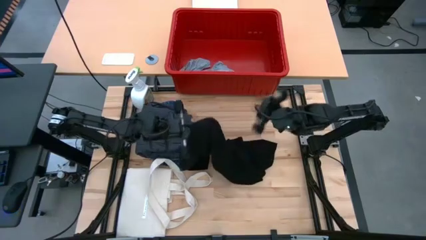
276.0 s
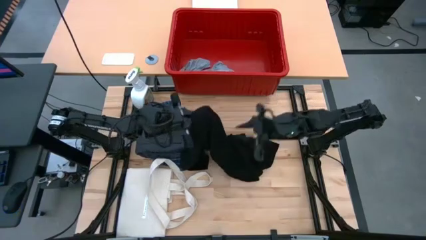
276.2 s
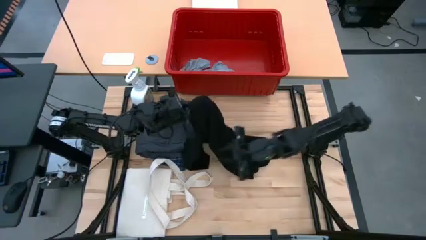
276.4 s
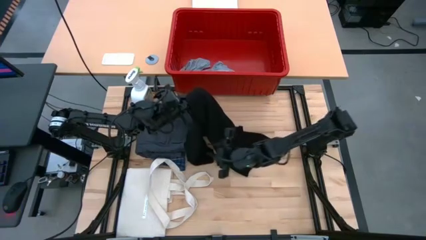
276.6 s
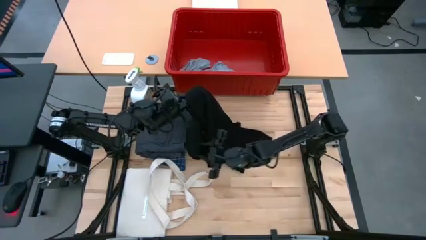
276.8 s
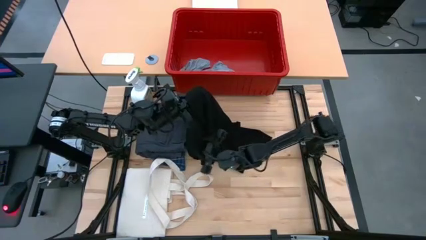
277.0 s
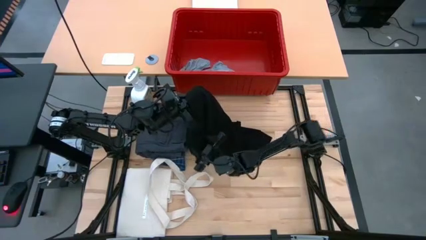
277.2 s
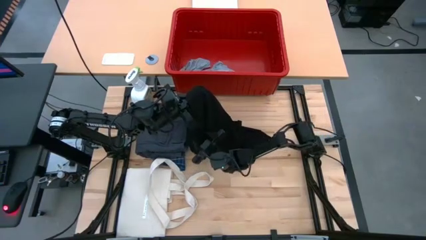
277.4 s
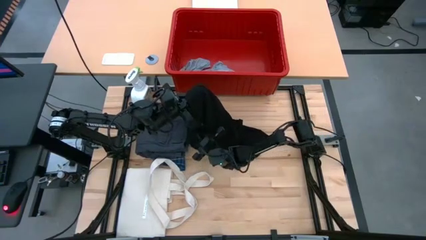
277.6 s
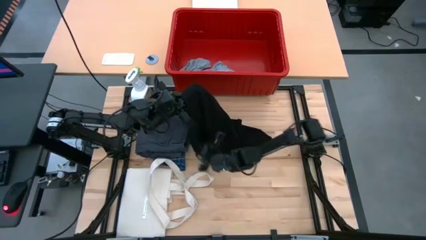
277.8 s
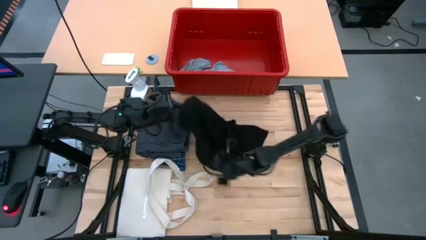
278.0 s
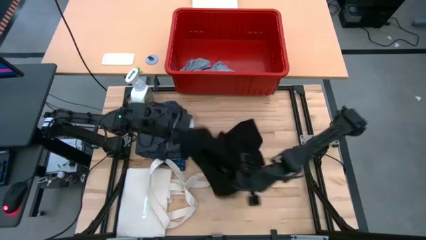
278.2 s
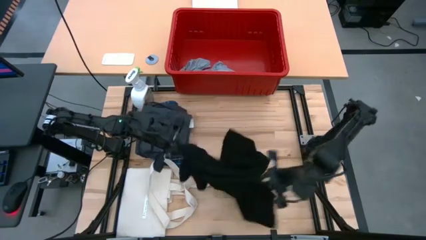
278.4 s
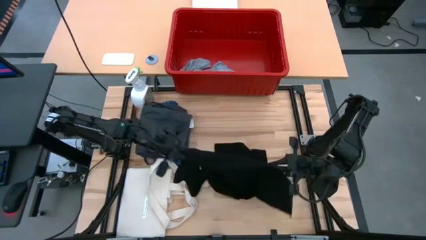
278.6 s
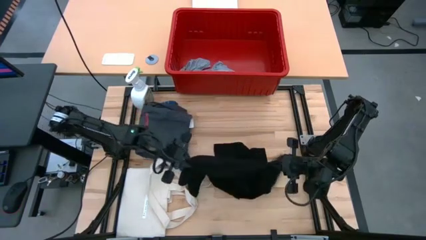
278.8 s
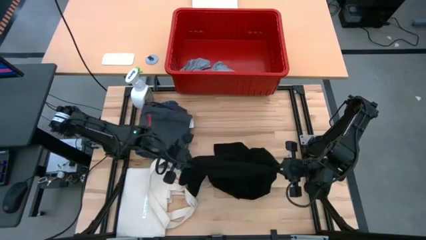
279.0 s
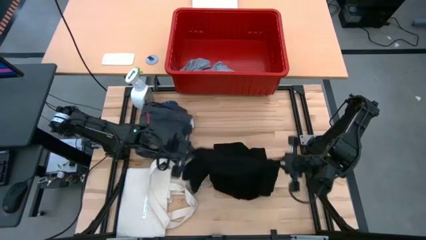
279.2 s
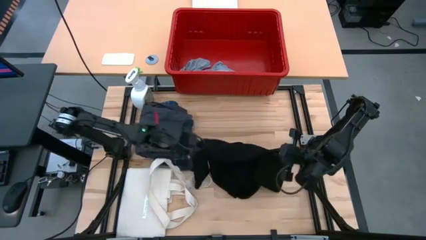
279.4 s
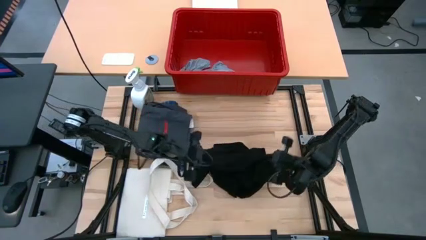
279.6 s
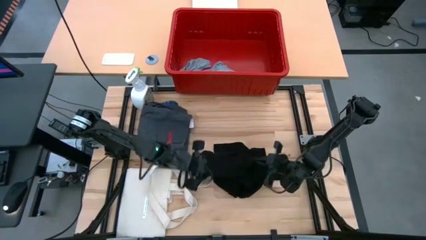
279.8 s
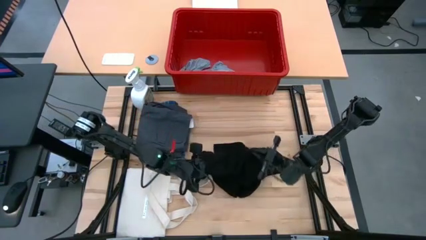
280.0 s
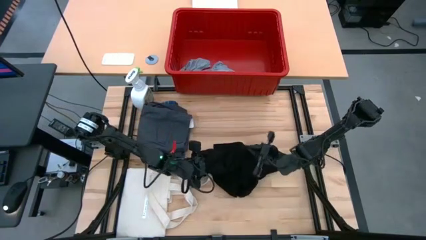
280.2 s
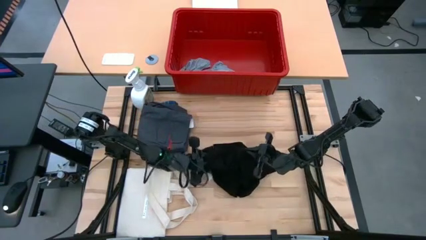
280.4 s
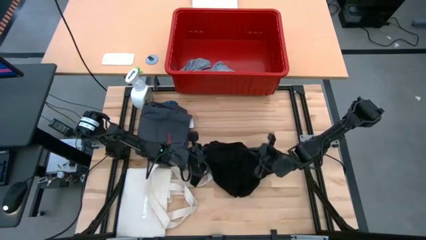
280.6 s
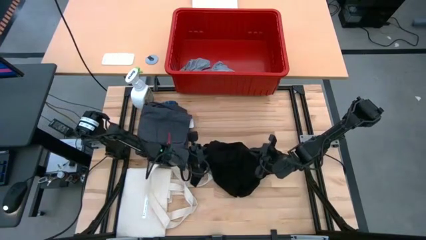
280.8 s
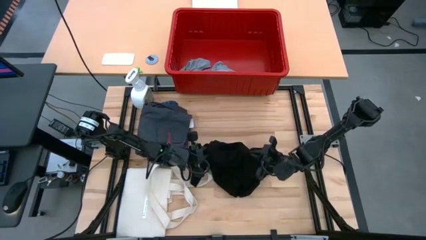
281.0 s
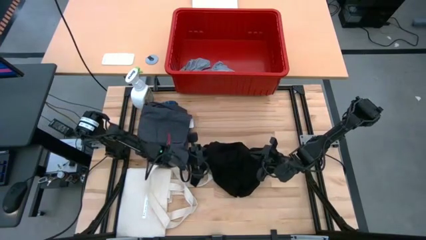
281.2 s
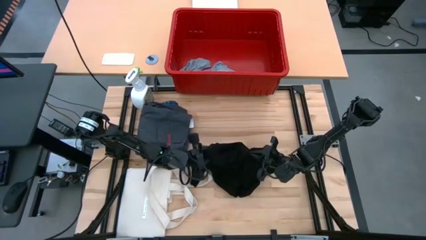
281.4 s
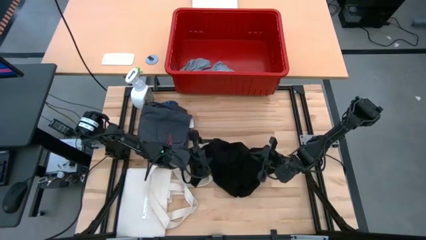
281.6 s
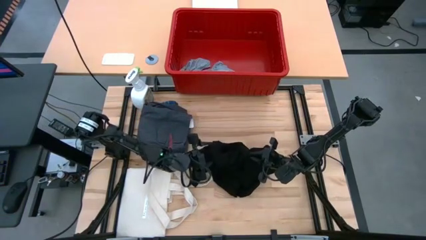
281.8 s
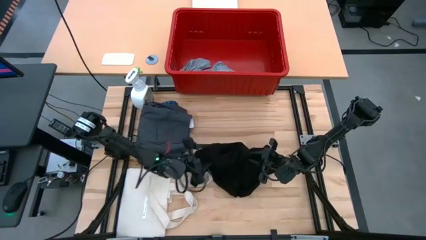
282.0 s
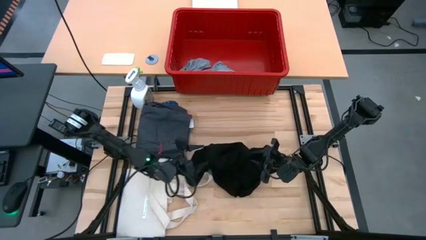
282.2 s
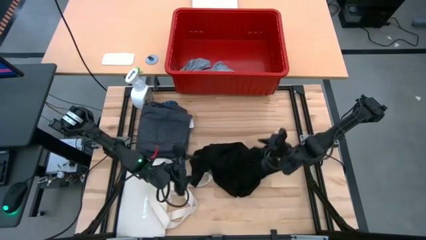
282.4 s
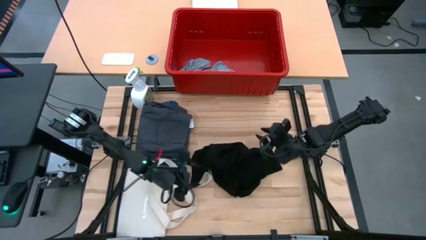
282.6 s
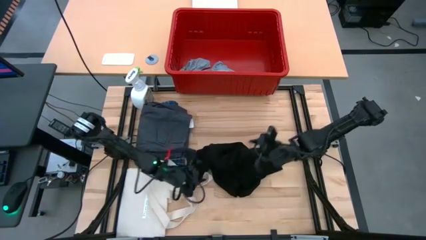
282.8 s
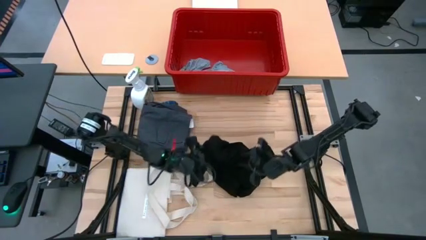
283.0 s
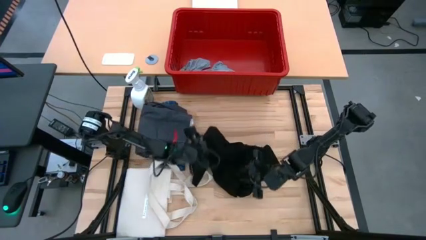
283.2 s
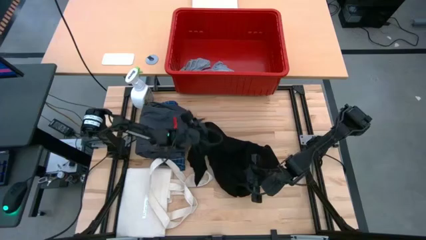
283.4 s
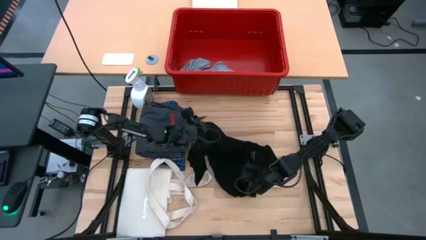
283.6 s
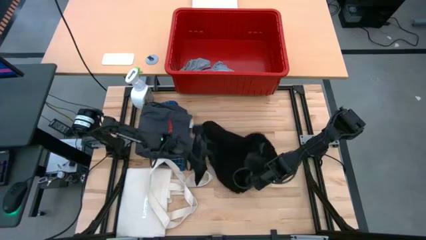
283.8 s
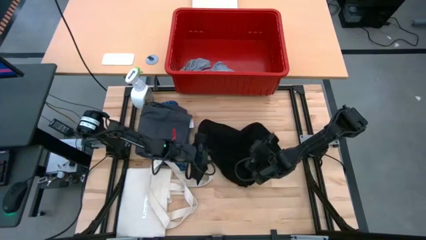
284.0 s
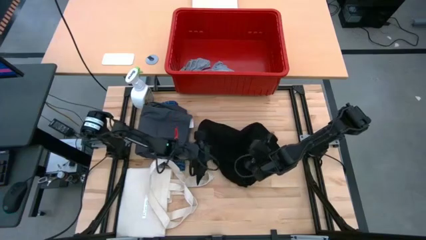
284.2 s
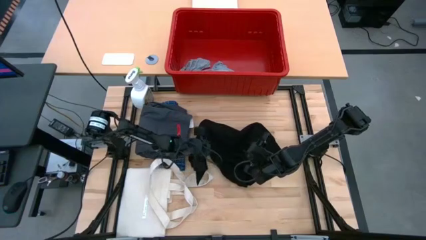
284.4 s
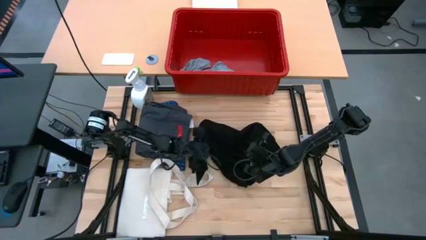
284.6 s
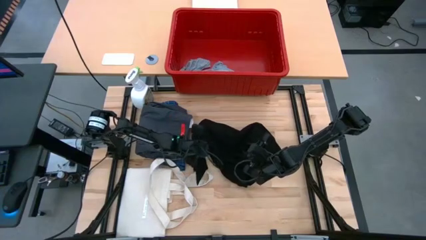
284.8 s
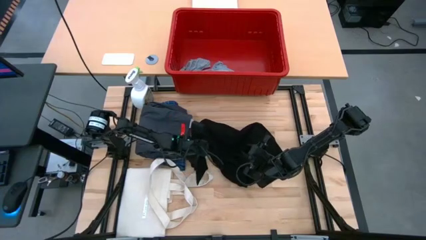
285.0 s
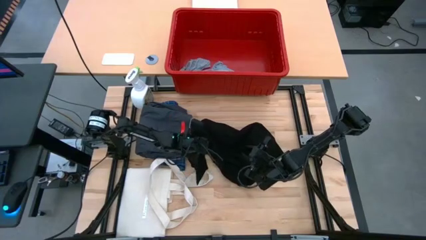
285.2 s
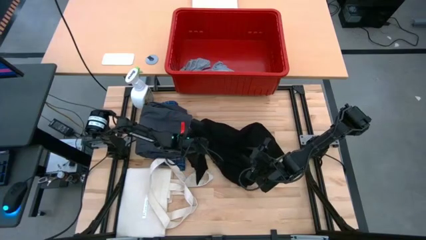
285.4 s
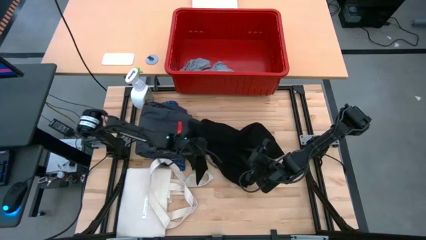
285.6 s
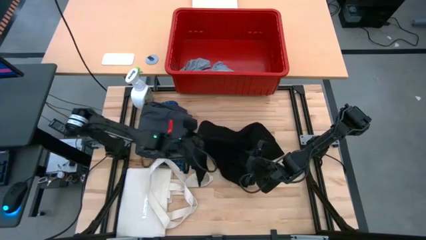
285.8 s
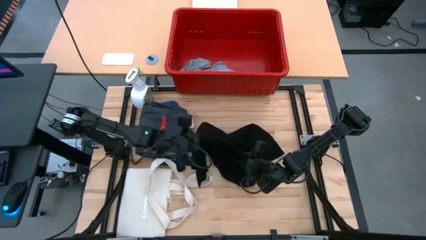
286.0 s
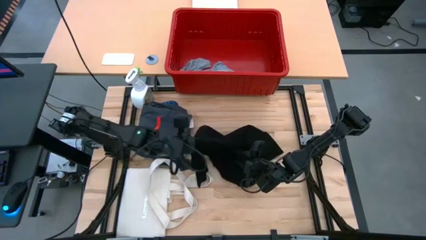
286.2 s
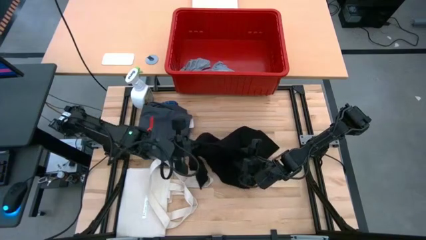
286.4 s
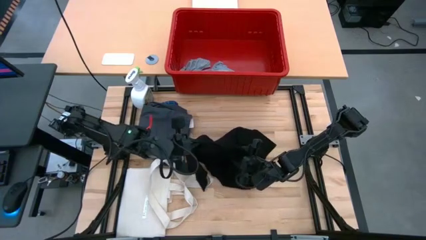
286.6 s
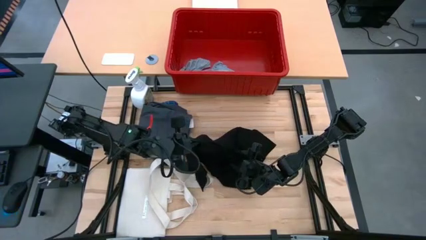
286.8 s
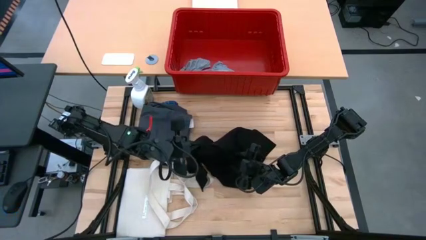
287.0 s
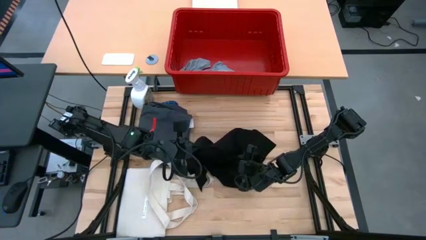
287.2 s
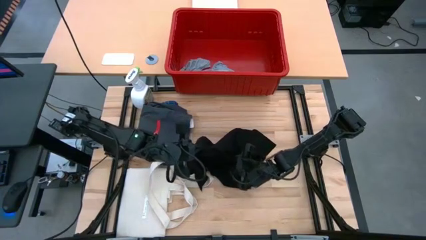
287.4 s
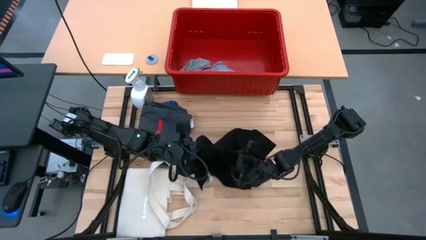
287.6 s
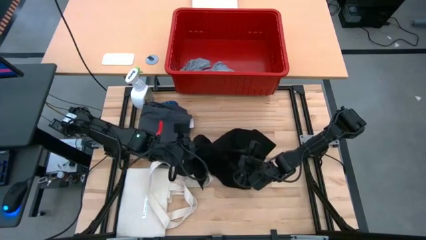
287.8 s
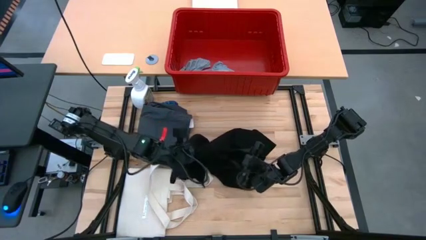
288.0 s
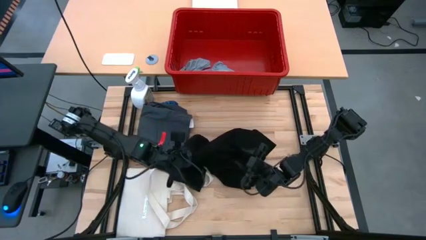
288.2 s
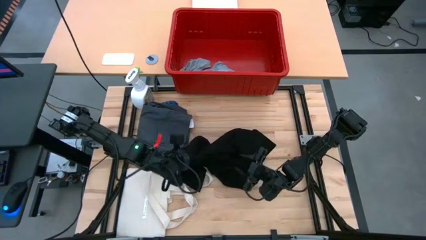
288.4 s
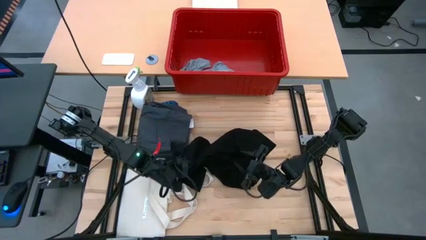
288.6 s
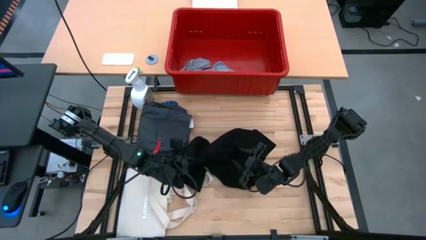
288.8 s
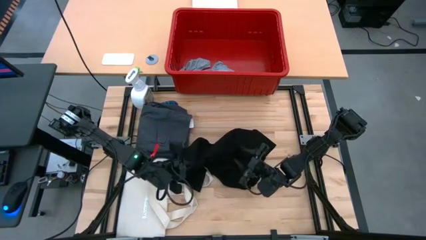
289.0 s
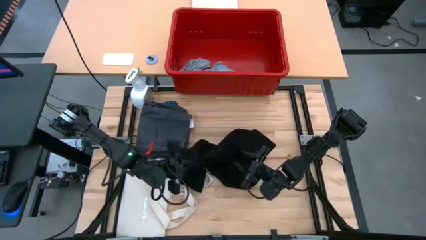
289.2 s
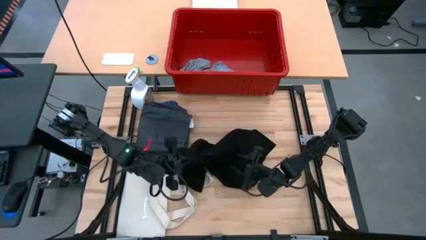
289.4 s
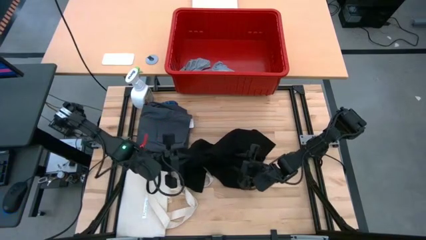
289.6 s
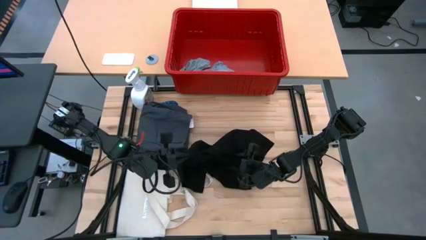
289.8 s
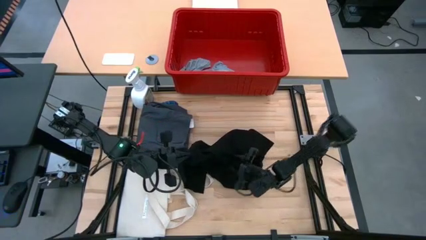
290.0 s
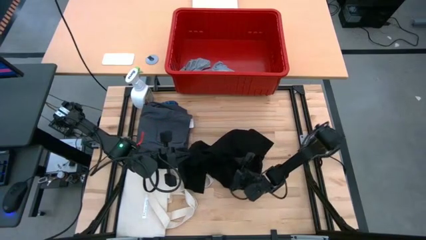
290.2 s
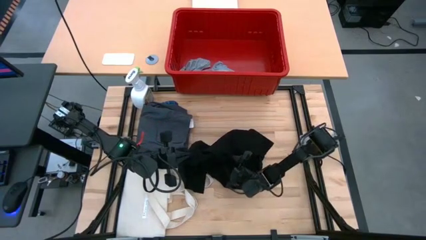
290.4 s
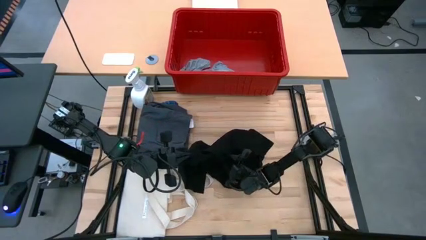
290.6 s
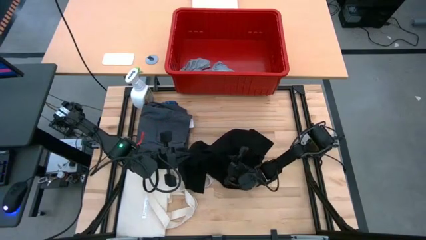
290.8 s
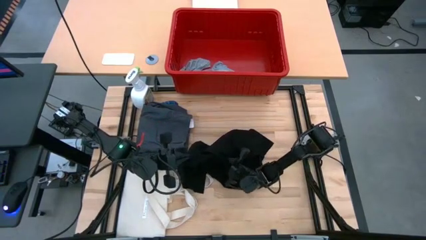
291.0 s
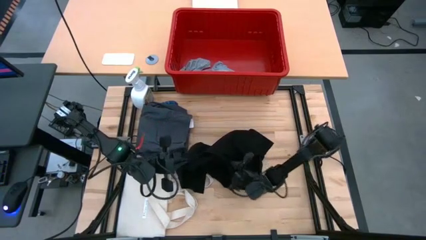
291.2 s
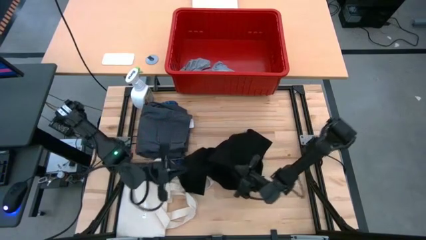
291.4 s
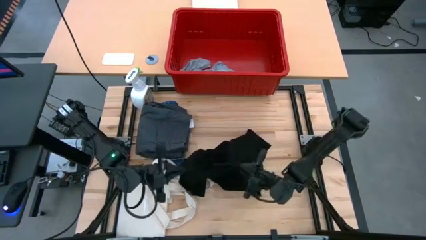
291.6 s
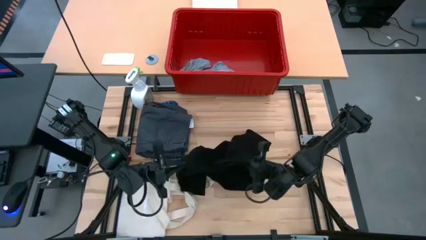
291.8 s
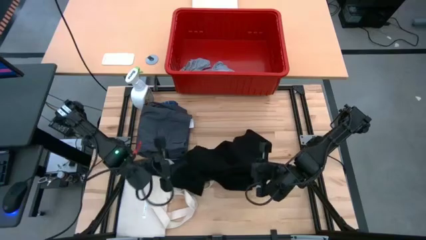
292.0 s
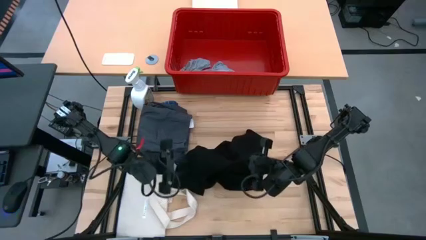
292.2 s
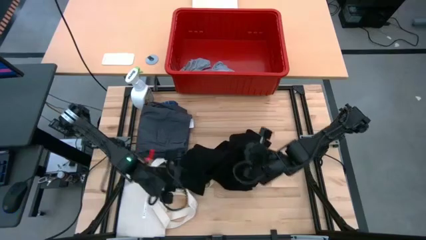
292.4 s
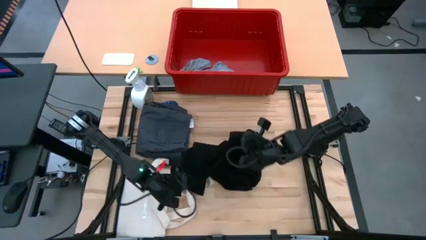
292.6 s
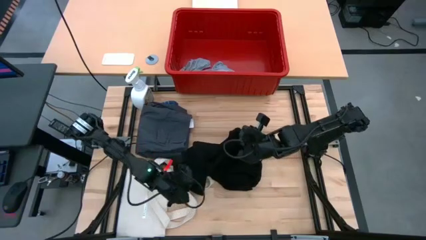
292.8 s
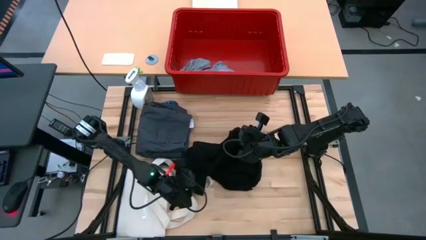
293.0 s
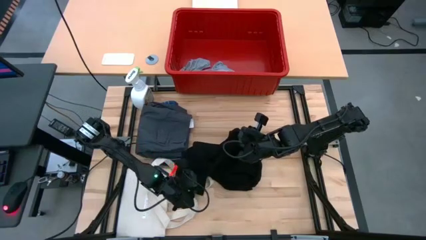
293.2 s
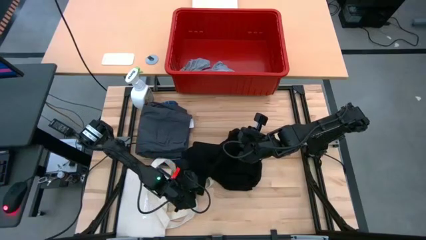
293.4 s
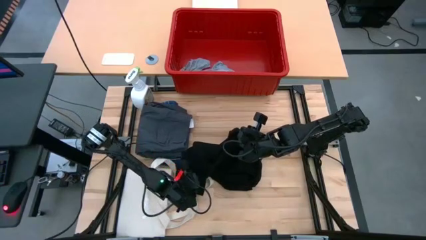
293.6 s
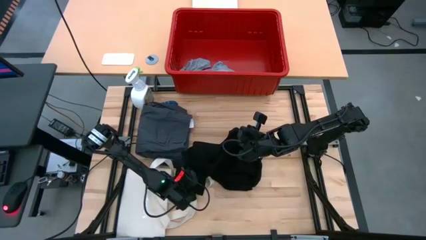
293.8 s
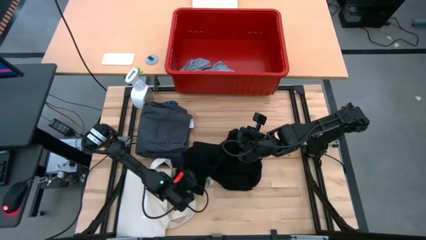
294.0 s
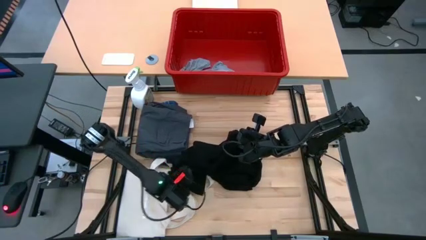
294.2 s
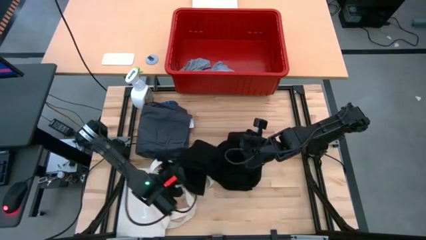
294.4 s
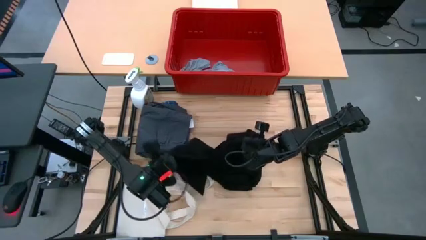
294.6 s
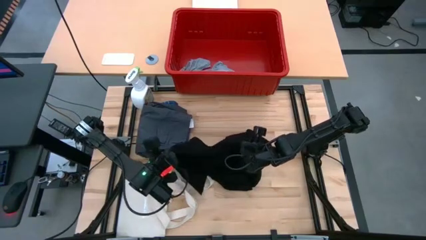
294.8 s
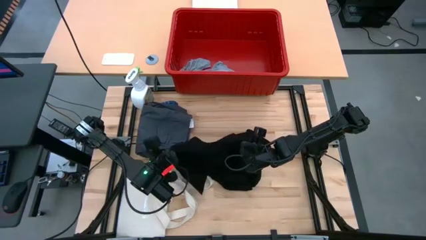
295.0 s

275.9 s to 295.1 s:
Task: Fold Laundry from Bin
Fold the black shirt
